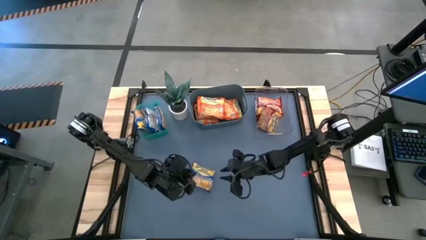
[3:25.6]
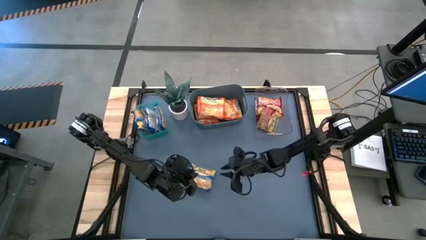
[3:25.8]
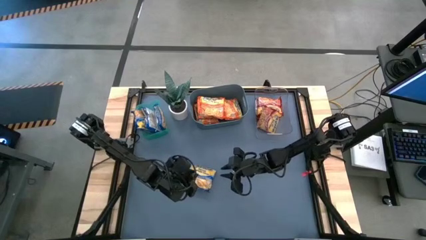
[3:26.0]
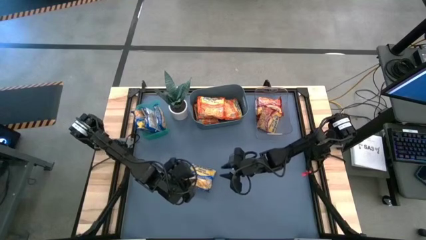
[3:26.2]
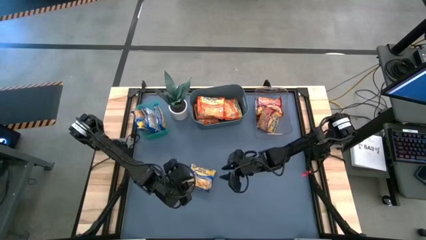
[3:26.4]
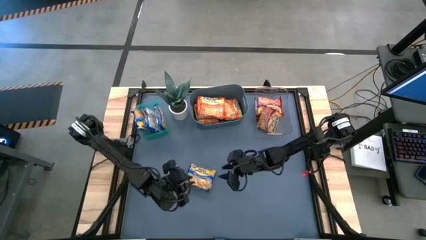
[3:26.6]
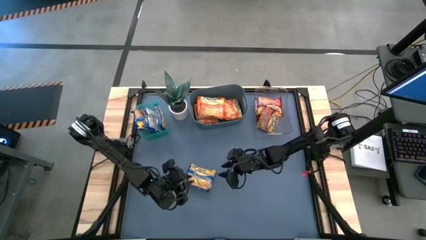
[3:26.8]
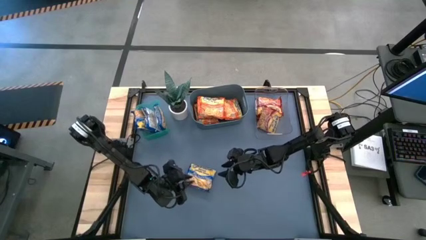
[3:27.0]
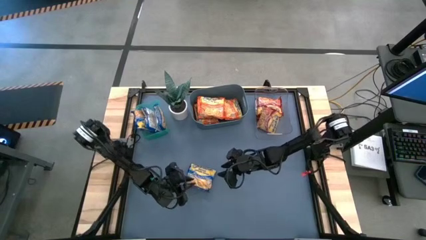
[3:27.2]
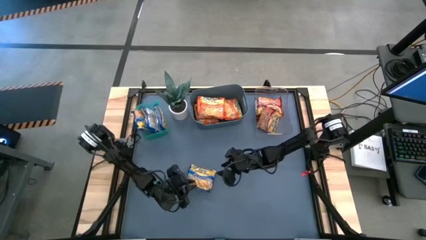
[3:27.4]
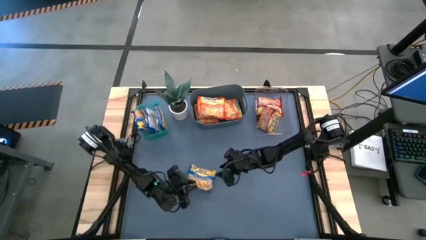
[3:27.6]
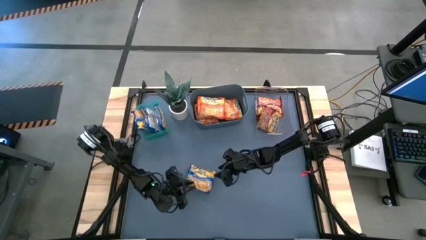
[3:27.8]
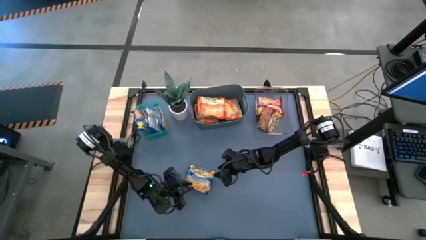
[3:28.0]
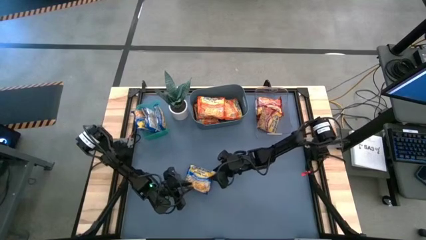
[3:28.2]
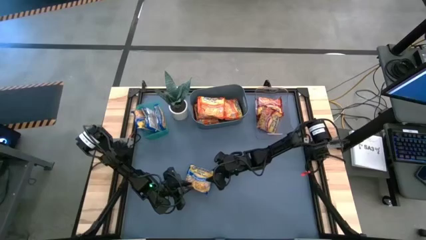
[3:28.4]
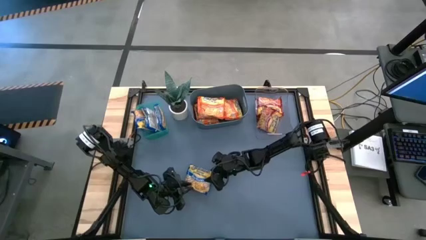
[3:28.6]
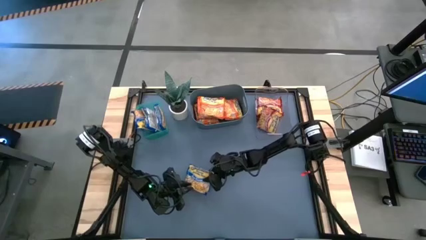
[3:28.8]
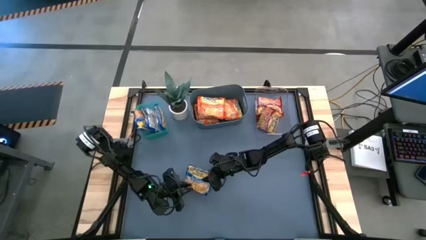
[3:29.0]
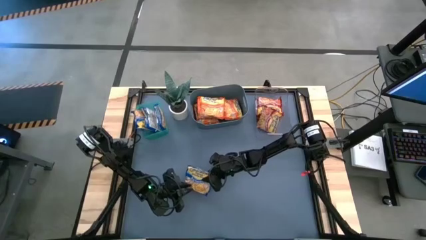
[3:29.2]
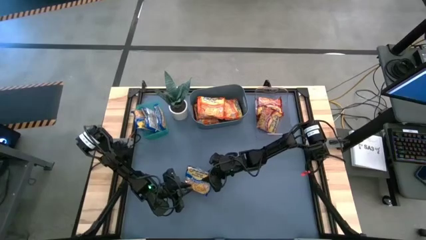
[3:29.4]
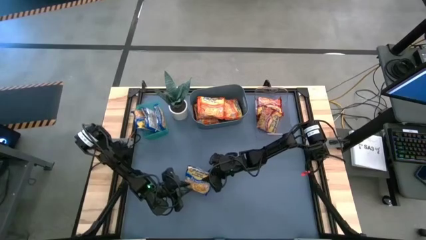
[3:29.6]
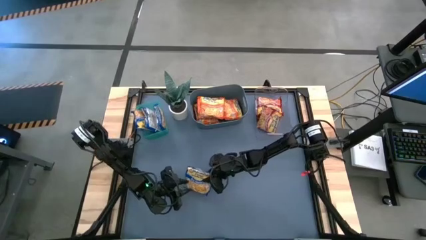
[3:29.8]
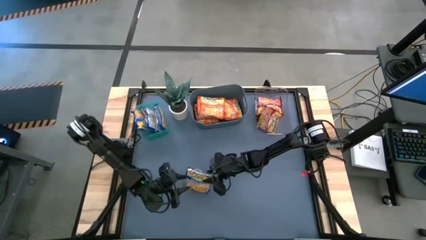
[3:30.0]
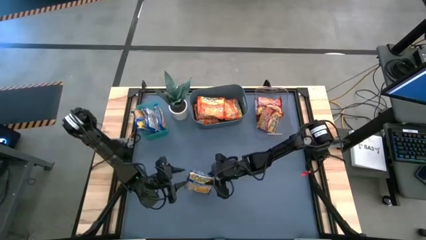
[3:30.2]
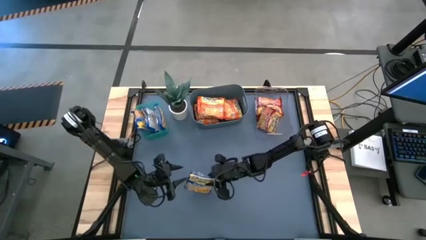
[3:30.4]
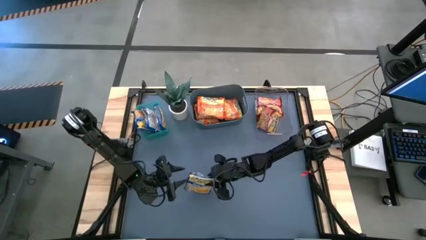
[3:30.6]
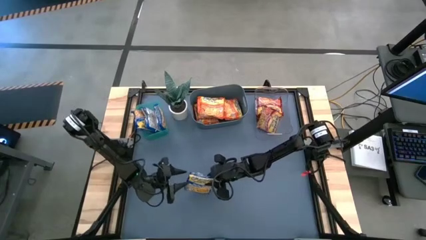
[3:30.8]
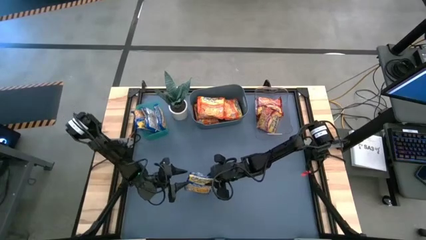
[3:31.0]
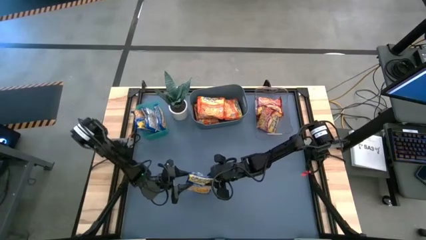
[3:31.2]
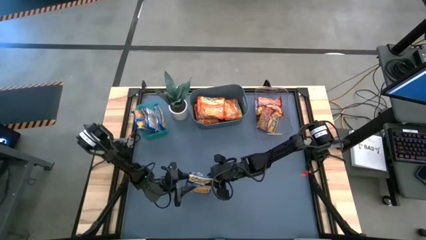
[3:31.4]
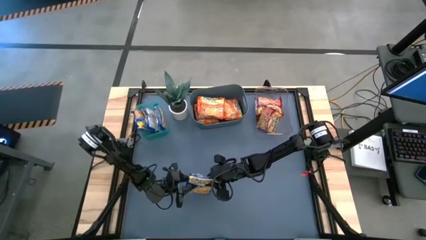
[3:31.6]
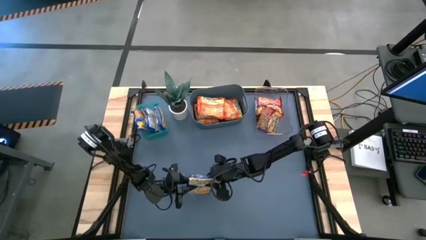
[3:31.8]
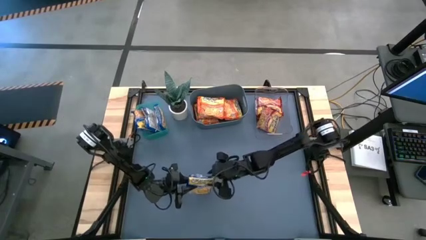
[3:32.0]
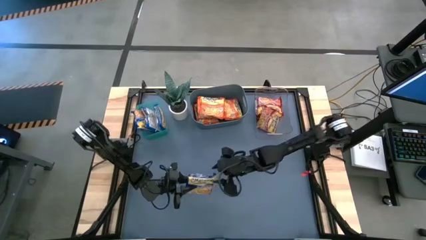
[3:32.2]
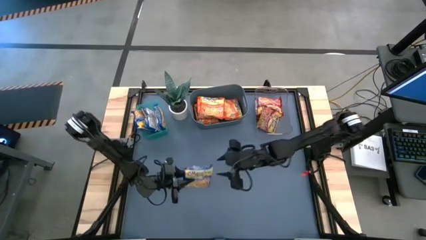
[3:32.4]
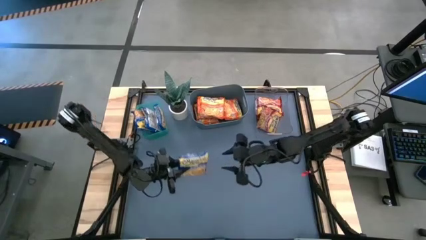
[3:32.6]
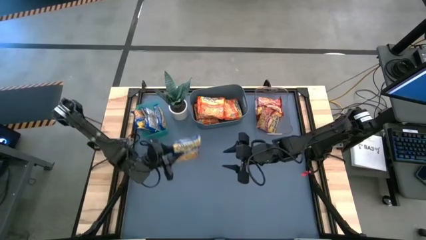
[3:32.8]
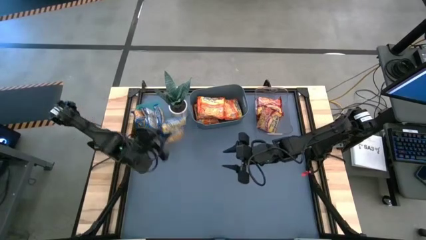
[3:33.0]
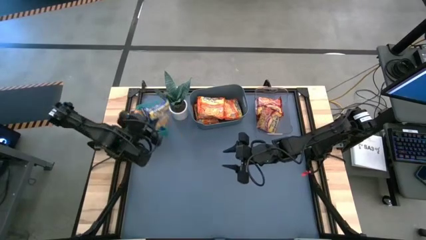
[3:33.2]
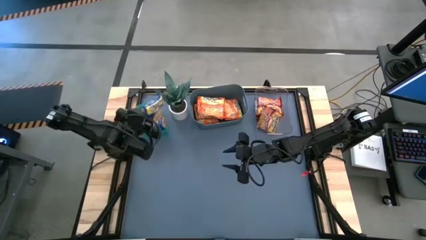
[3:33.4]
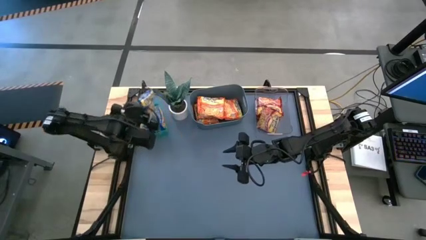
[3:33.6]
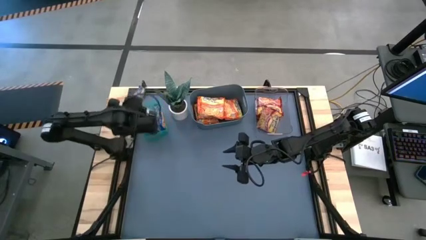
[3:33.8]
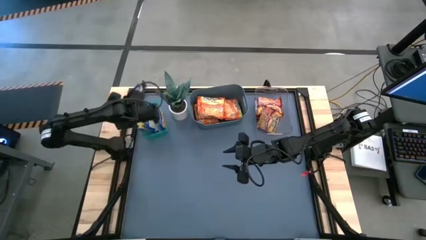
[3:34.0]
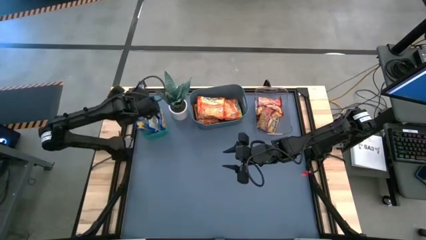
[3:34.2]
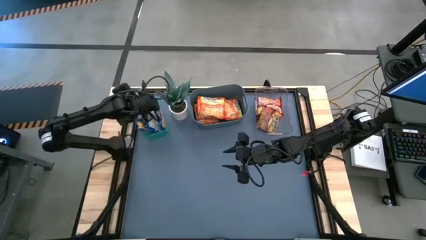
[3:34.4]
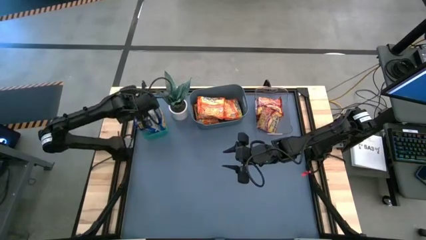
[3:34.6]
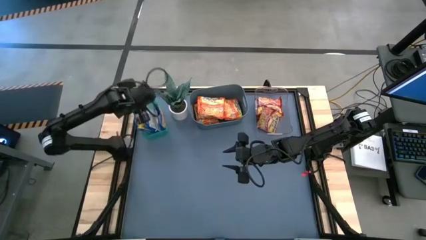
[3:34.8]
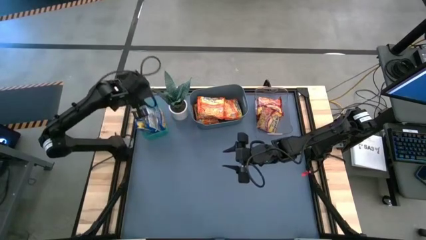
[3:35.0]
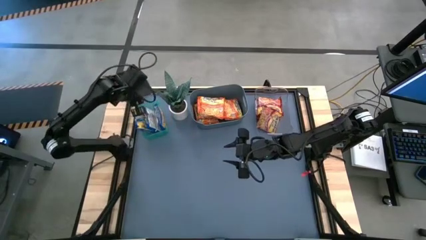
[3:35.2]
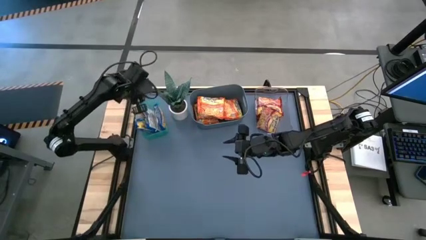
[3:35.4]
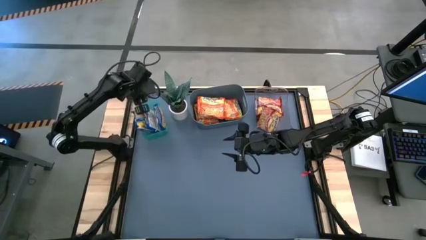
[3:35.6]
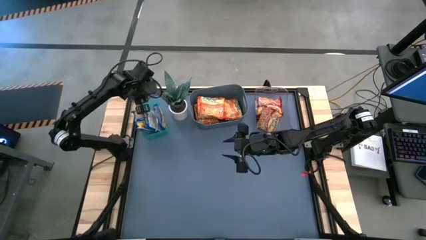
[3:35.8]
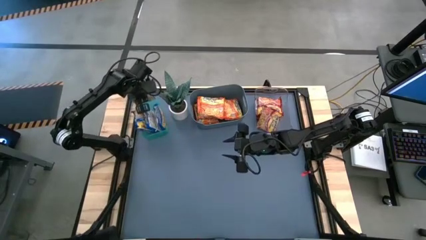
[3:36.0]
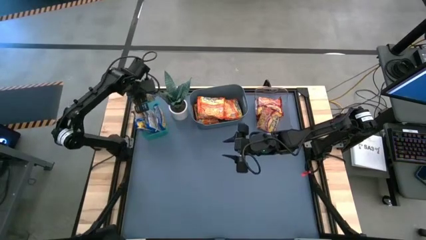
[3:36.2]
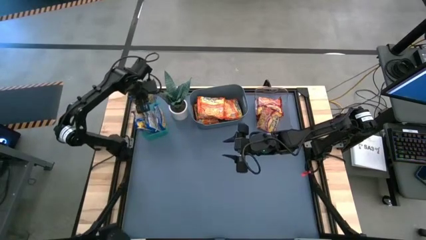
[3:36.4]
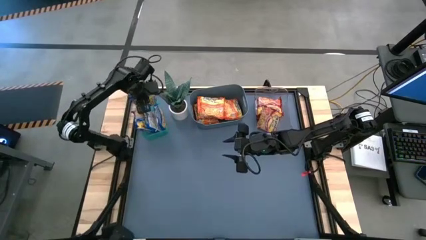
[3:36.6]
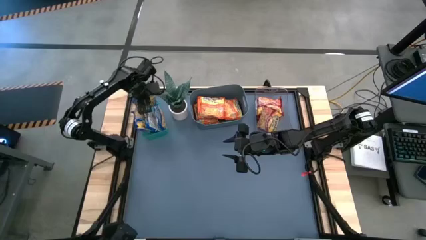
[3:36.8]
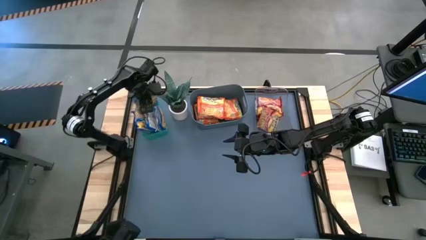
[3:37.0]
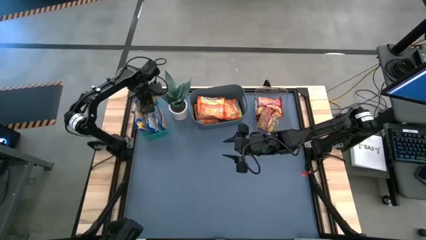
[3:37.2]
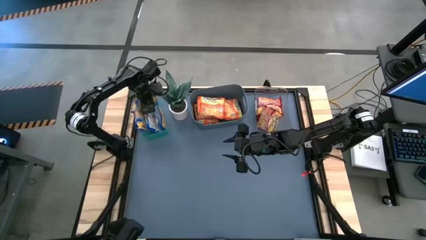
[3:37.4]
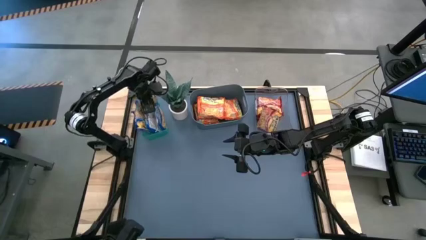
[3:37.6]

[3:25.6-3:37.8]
Task: Sort Maruchan noodles
Put the blue noodle pack into the green bin

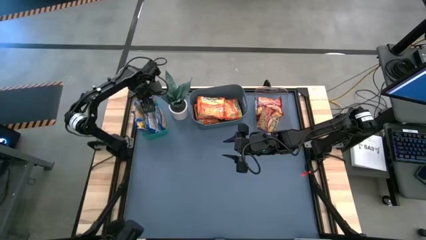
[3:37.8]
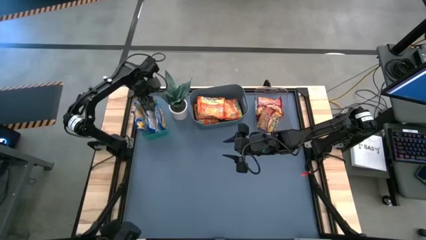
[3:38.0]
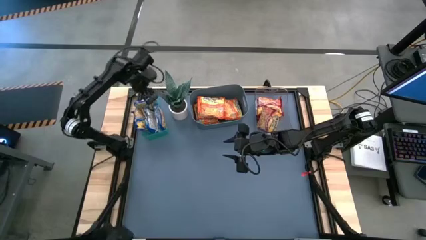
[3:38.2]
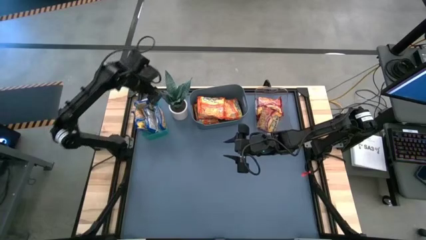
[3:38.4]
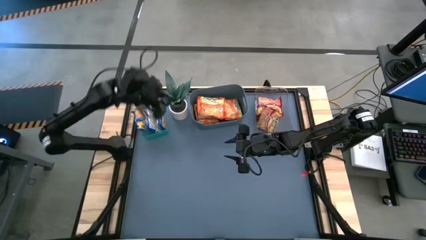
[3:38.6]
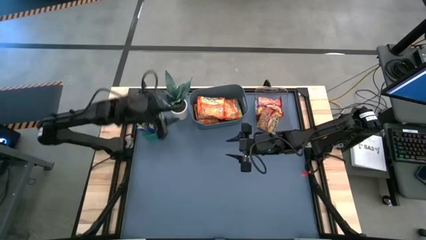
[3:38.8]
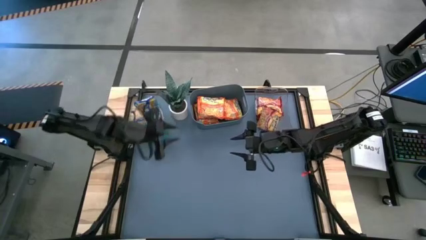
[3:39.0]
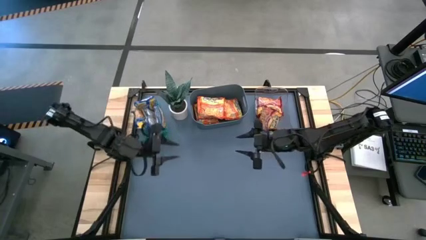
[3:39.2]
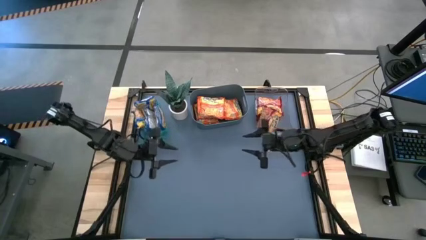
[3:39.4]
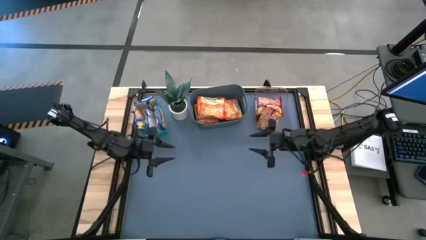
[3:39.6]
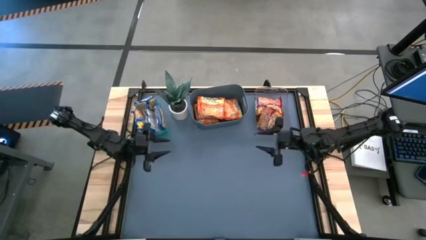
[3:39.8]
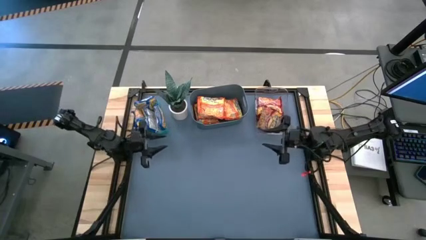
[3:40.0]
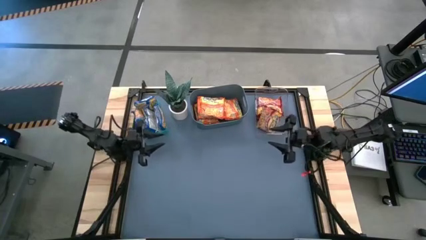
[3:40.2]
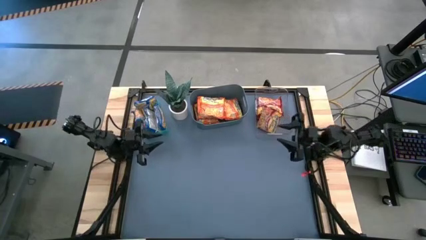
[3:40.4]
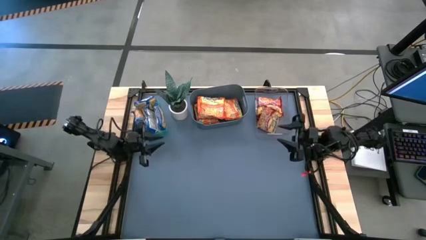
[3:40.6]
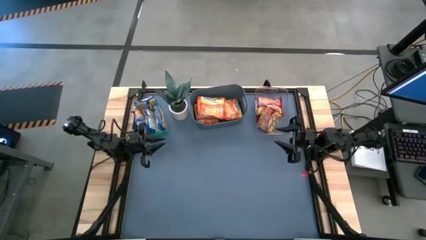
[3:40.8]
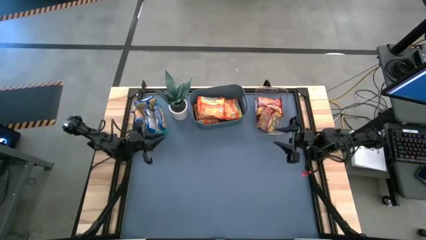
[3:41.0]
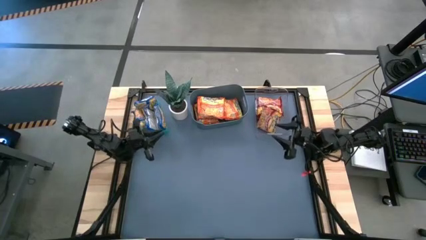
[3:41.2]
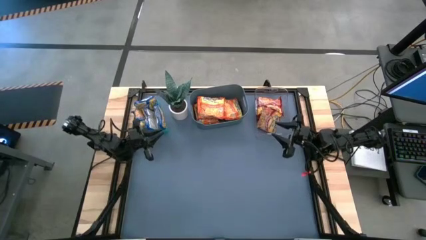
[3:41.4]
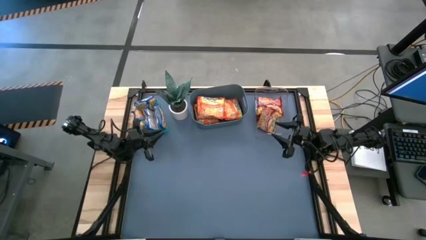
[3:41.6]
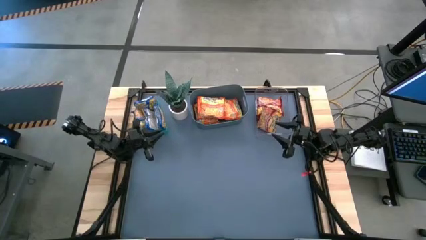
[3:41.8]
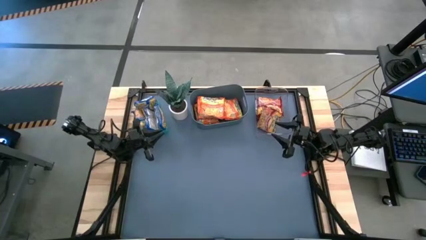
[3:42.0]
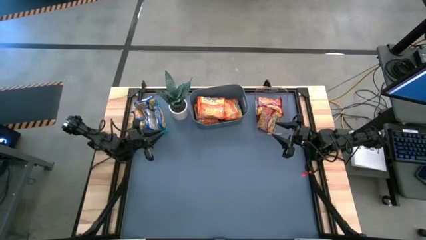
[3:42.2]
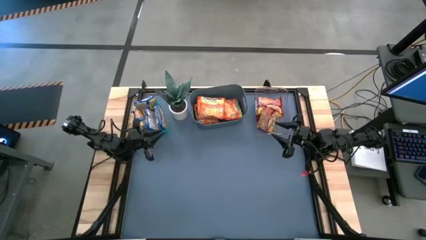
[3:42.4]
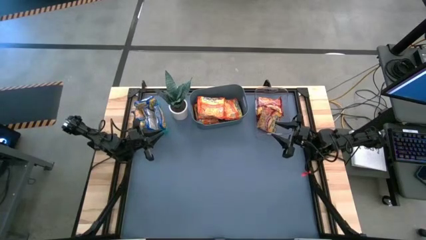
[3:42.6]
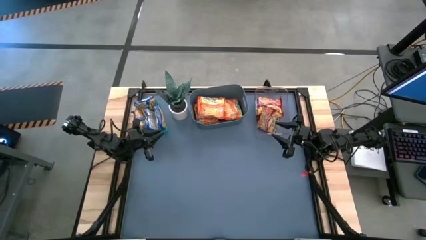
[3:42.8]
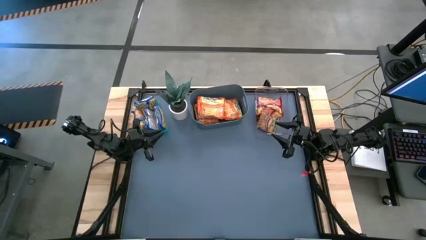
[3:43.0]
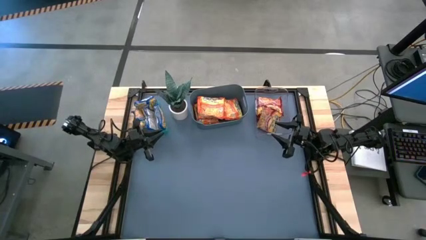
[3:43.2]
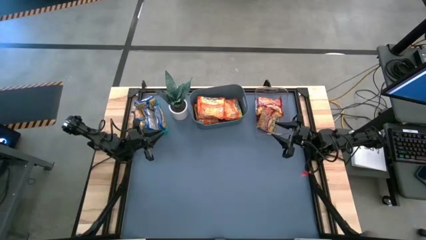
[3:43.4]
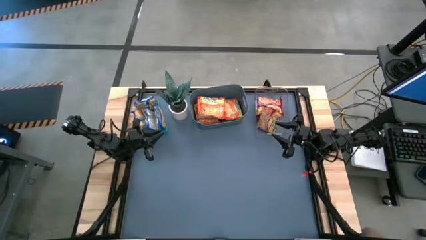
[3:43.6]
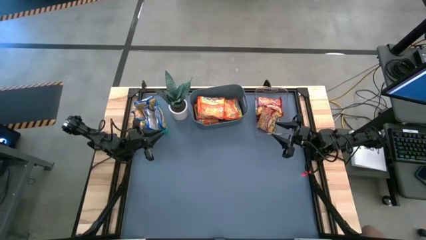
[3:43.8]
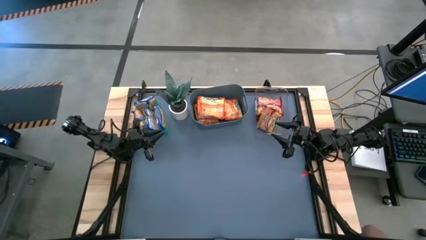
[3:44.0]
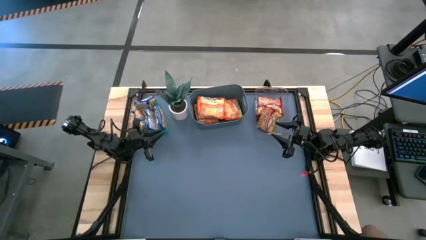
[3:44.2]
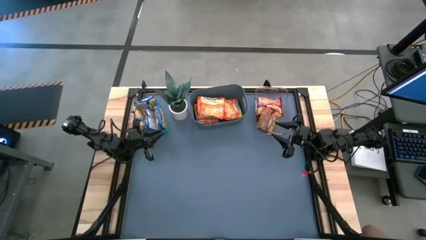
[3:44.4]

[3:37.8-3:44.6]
Return to Home Position
